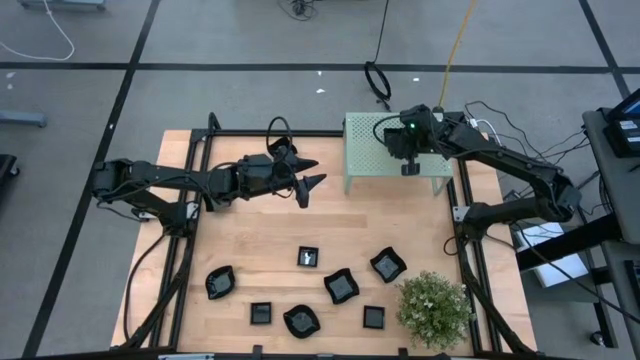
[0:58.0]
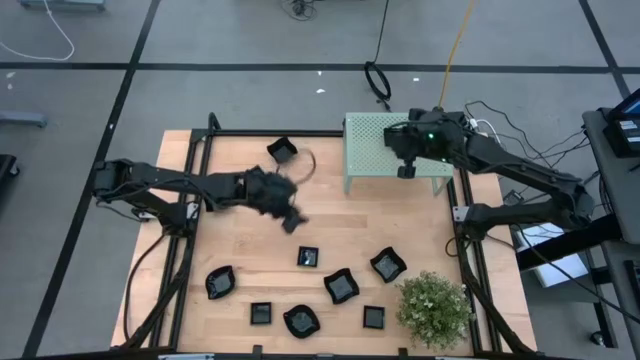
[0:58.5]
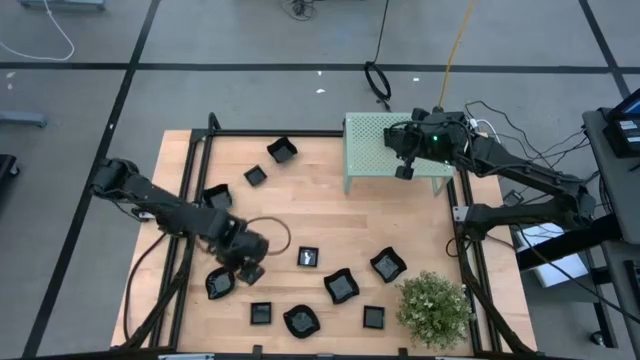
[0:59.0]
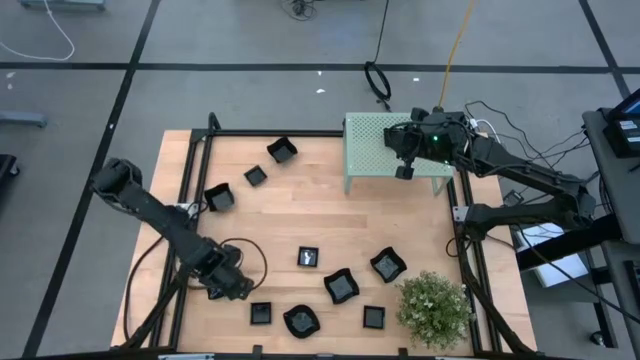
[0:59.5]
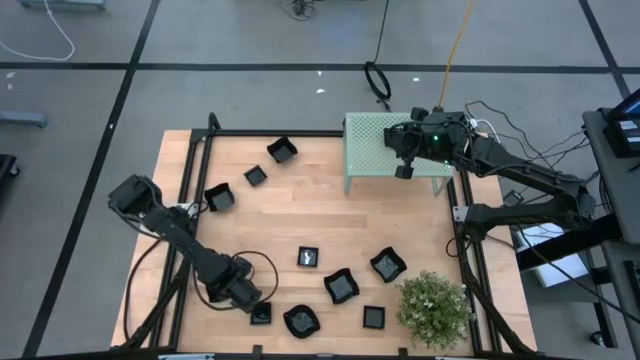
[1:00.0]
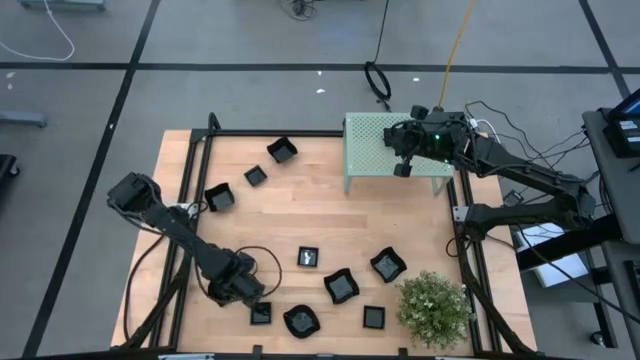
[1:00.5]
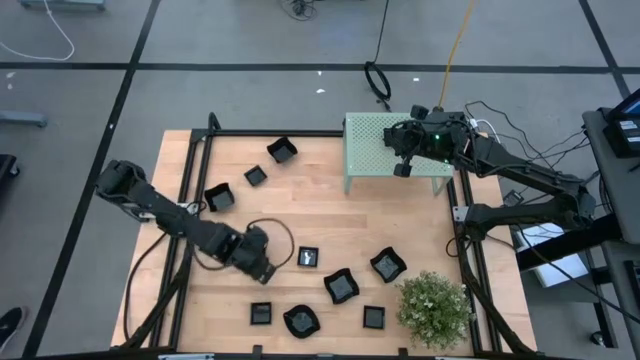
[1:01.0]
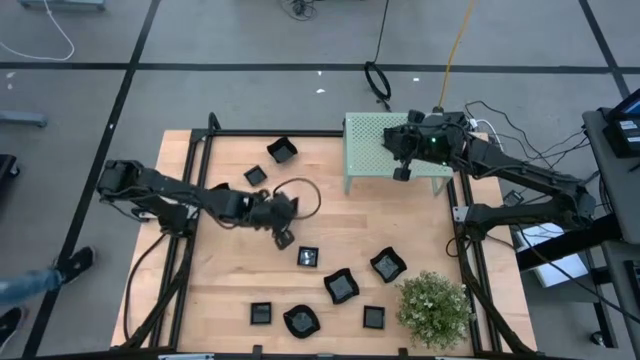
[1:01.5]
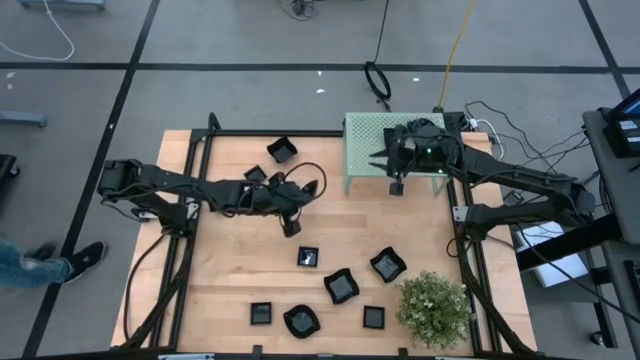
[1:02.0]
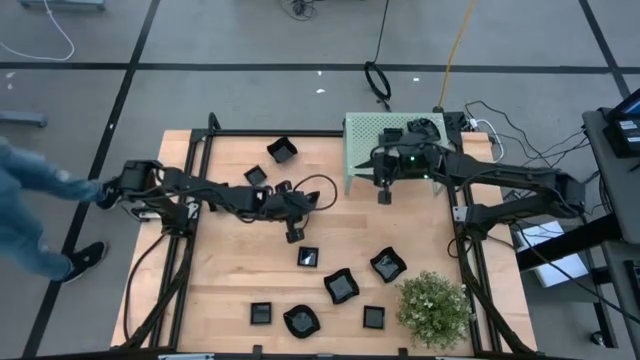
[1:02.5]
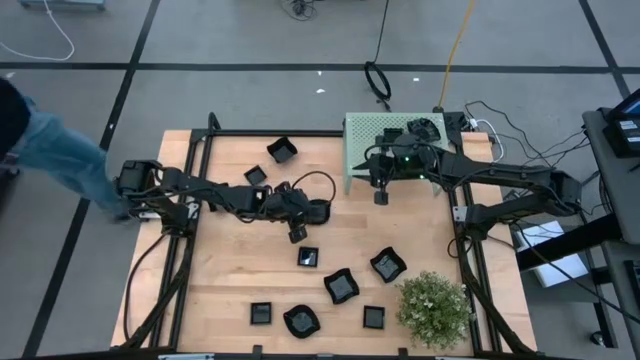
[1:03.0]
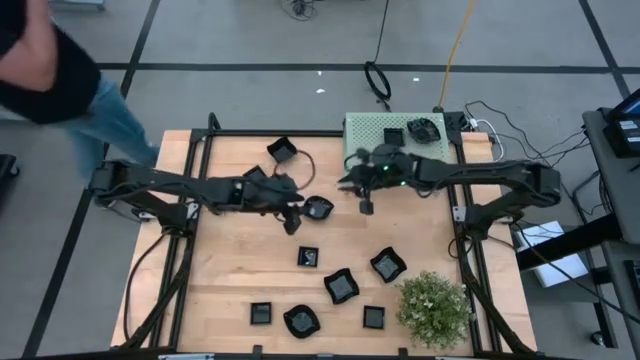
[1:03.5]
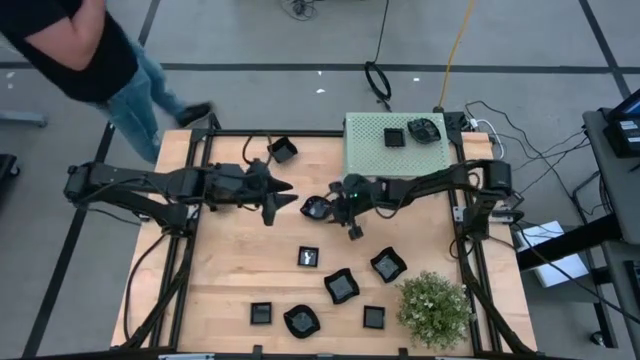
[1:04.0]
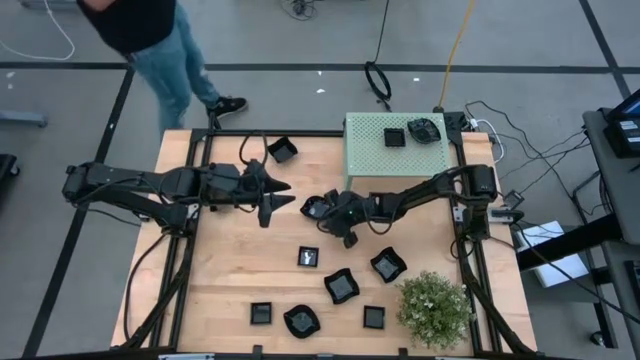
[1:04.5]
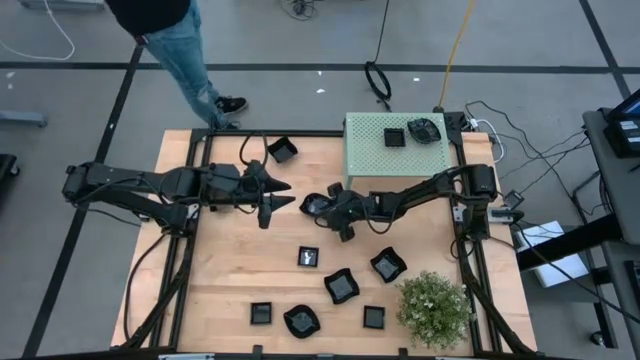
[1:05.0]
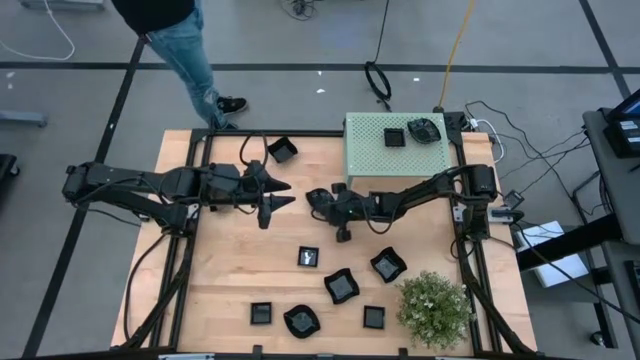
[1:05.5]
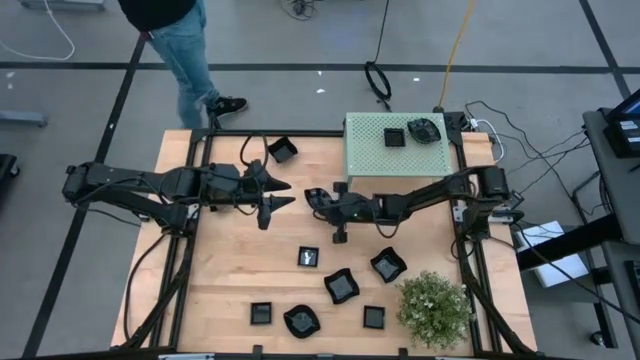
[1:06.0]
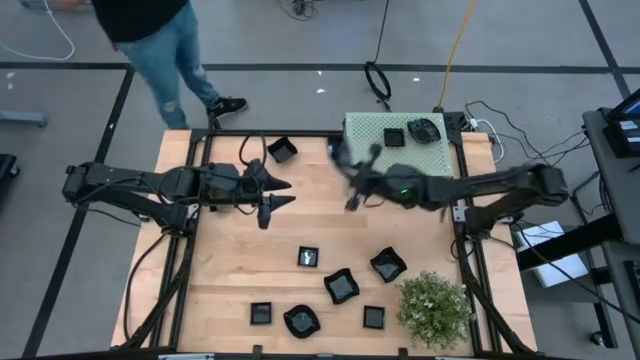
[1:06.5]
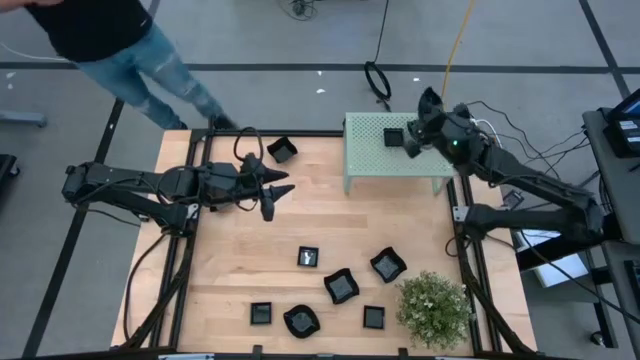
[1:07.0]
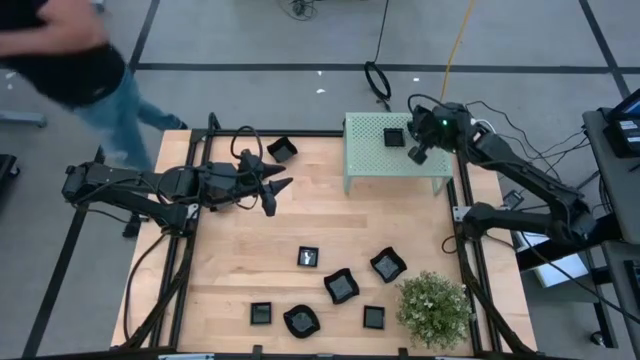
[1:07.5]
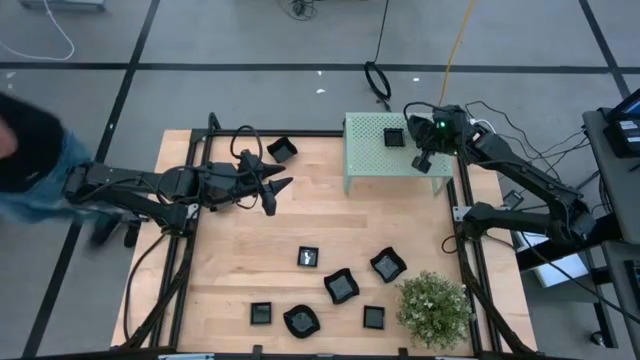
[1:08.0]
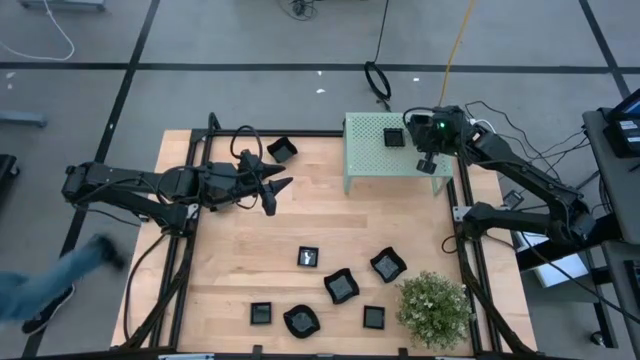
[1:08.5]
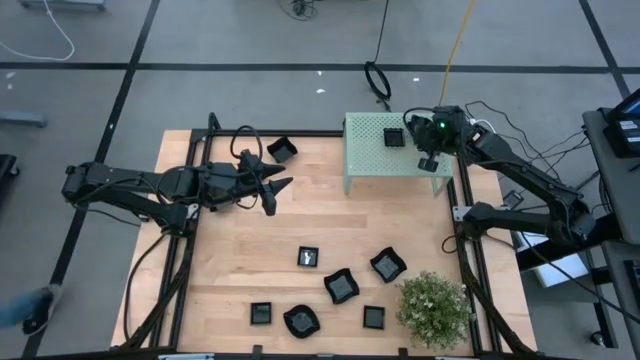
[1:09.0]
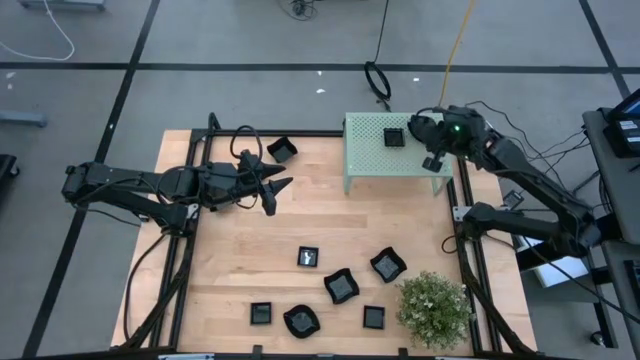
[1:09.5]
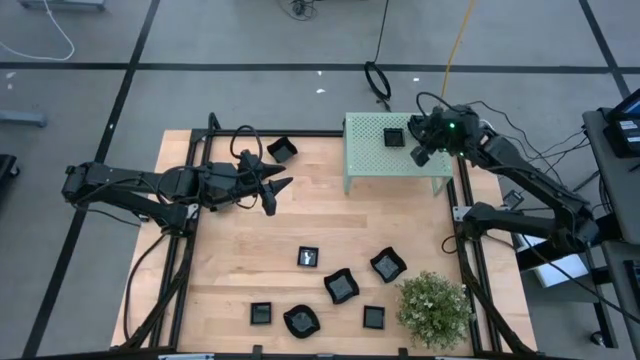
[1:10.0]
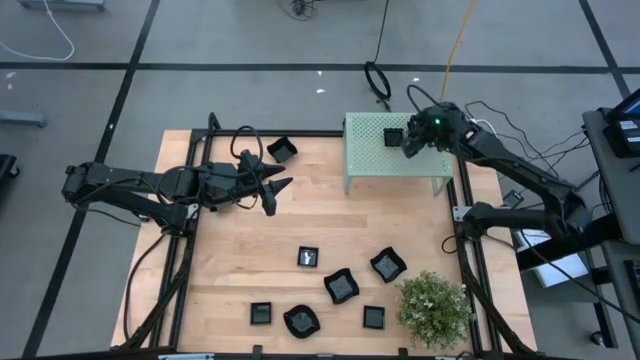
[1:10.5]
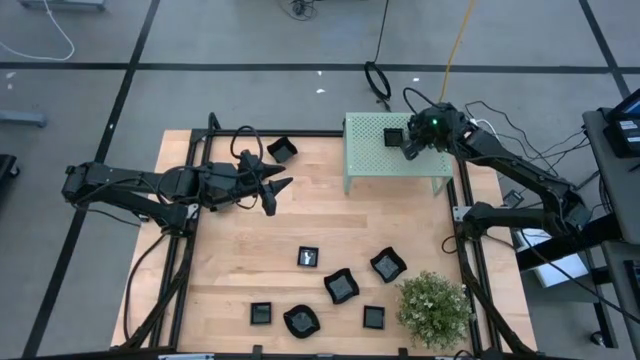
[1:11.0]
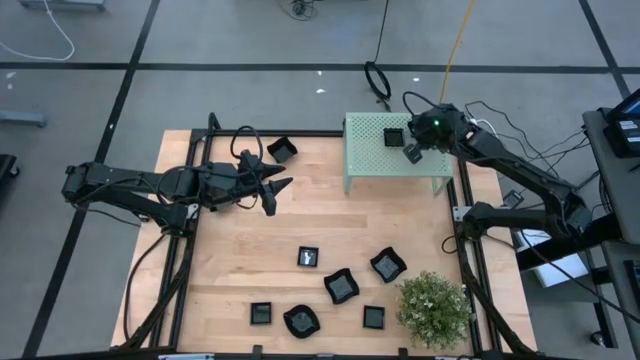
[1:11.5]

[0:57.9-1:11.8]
Task: Pick & Place Mini shaped plates
Stack the black leaf-shaped plate on top of the leaf-shaped plate on the shelf

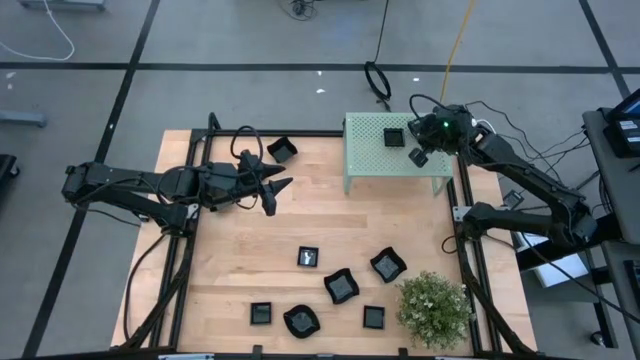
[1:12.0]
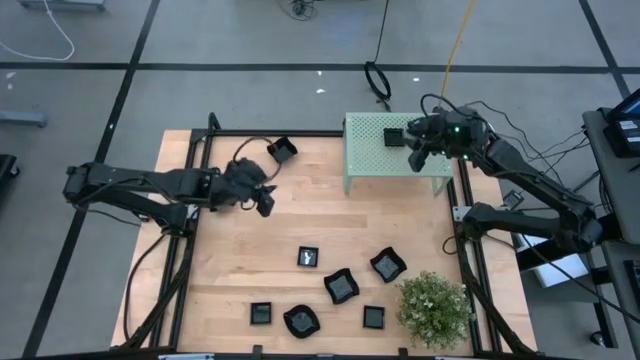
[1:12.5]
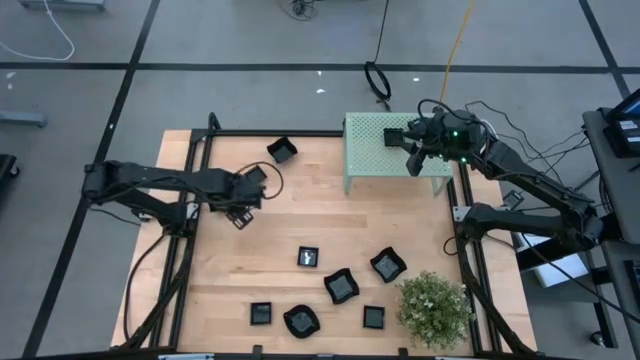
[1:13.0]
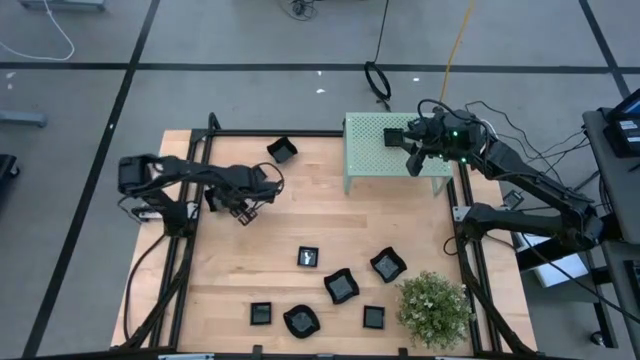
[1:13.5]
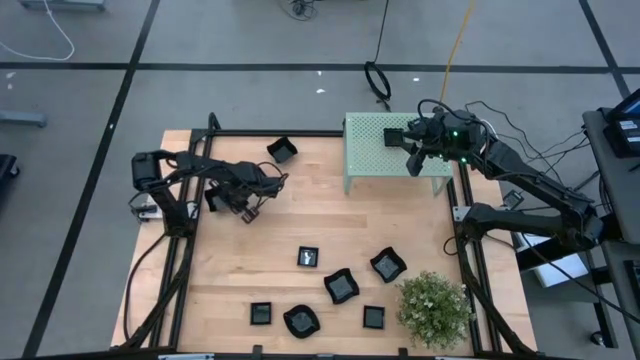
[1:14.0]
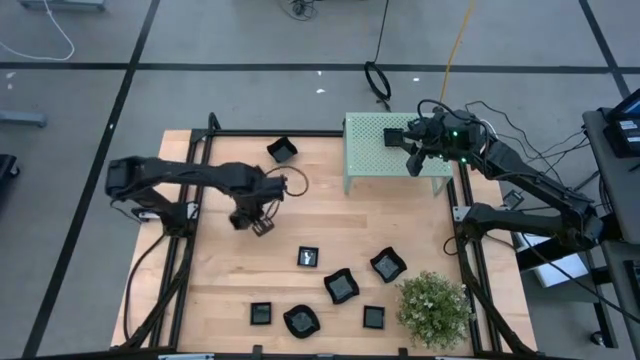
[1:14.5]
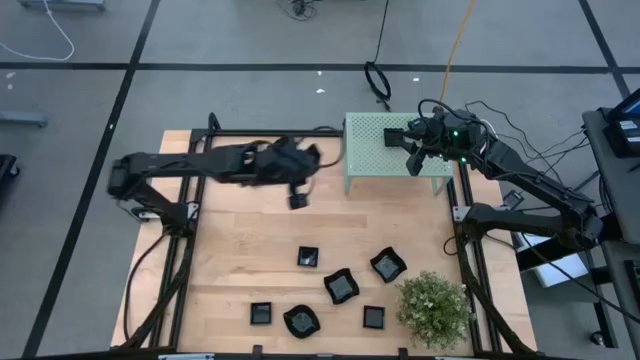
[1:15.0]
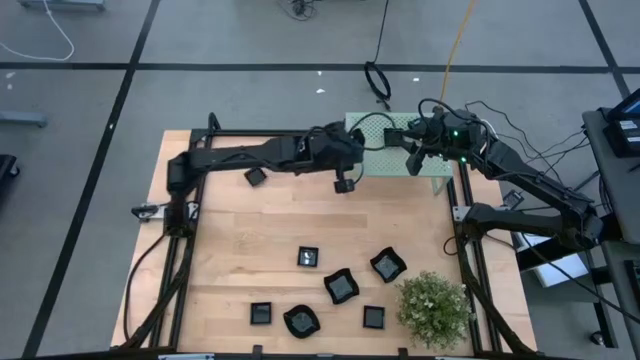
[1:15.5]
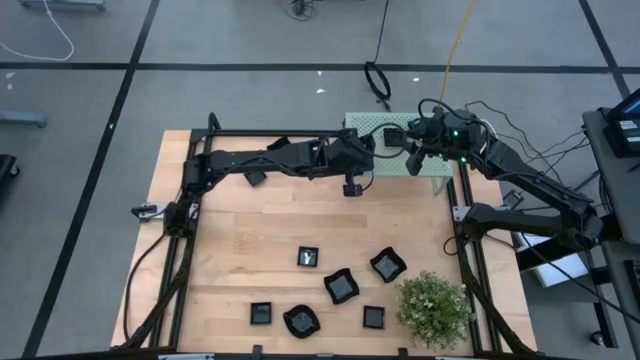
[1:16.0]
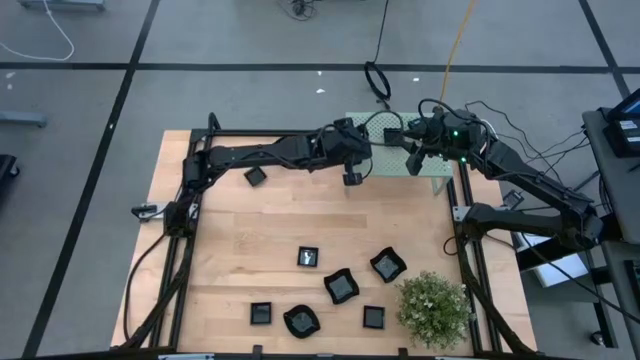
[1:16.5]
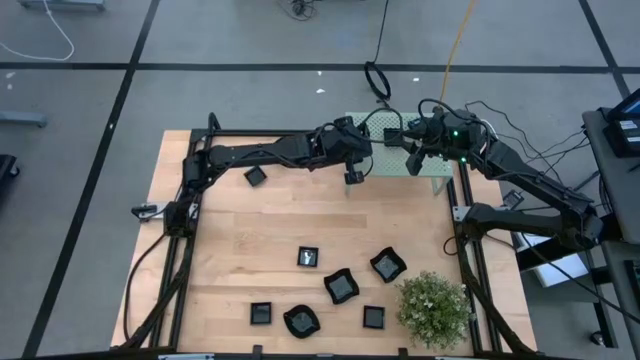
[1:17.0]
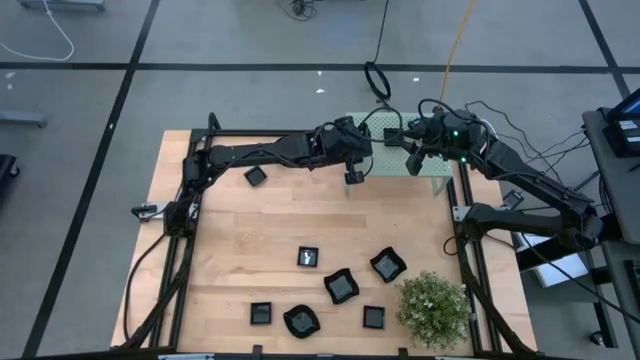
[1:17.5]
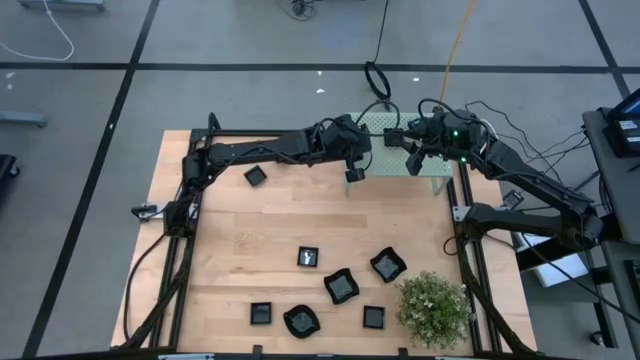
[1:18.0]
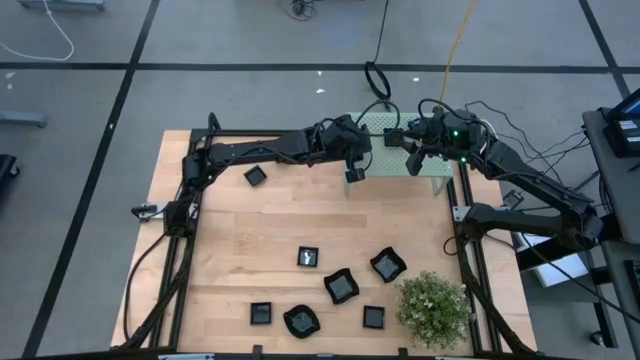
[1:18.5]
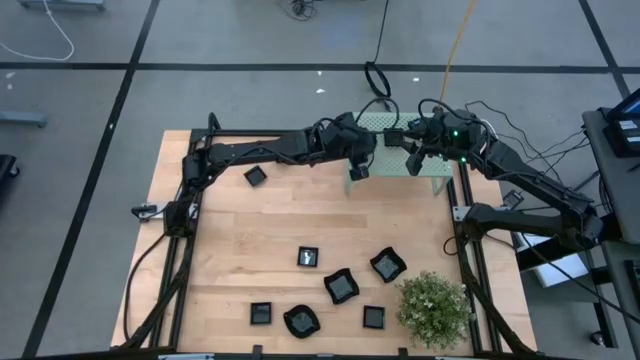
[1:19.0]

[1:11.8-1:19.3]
Put the black distorted square plate on the shelf

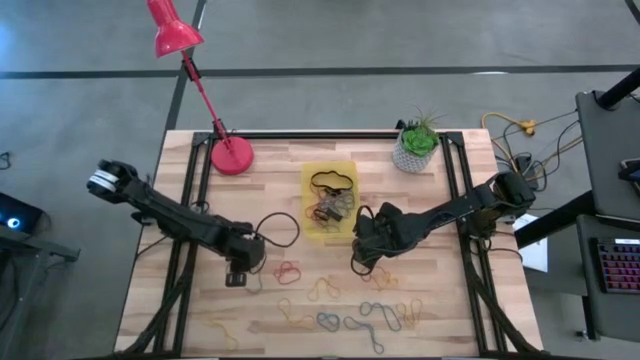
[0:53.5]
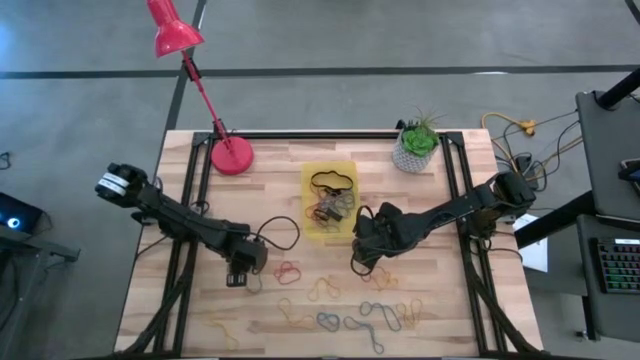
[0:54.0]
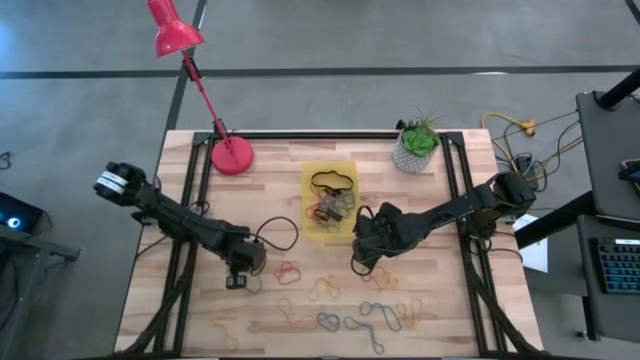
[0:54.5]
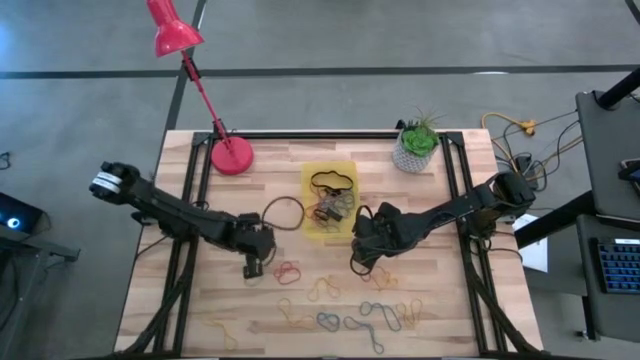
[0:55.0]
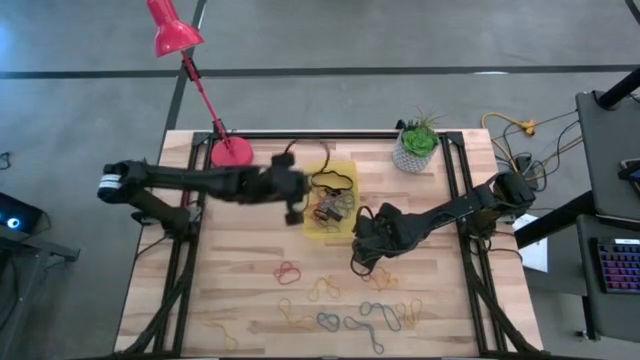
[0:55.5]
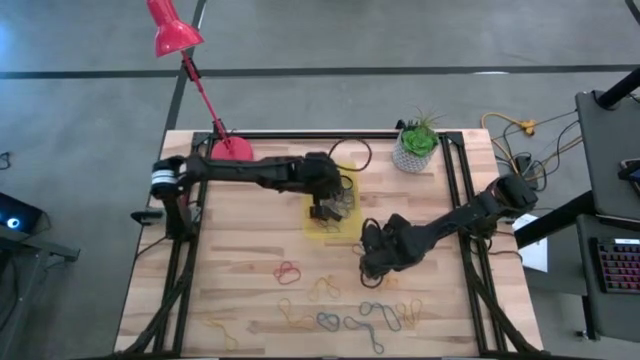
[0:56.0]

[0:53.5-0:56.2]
Task: Pick and place rubber bands into bin
Put the blue rubber band into the yellow bin
